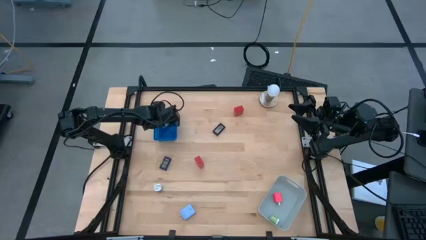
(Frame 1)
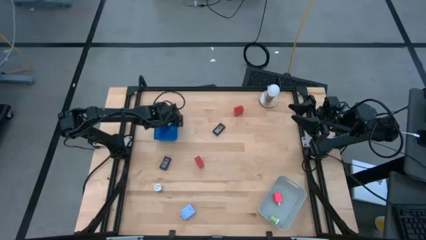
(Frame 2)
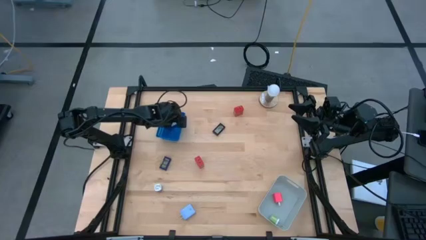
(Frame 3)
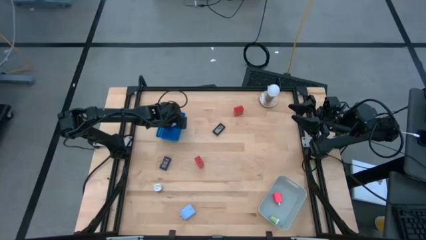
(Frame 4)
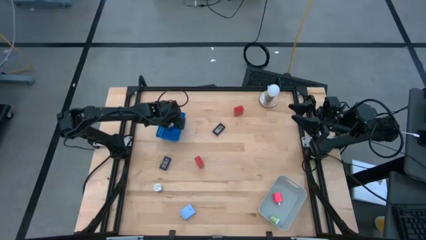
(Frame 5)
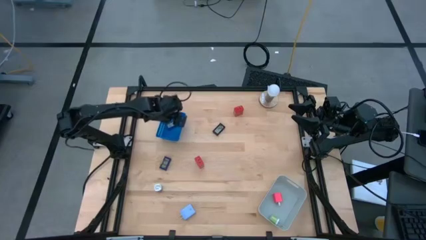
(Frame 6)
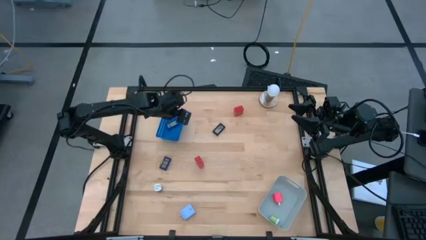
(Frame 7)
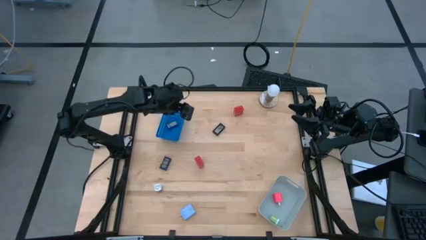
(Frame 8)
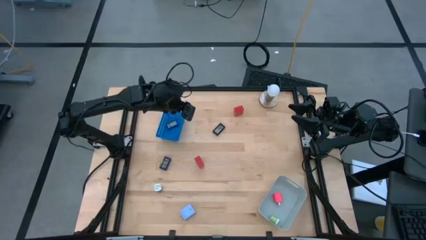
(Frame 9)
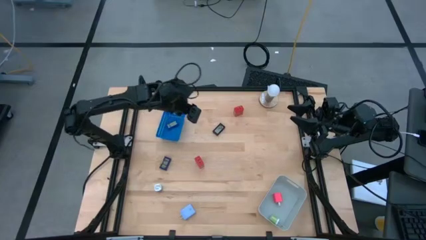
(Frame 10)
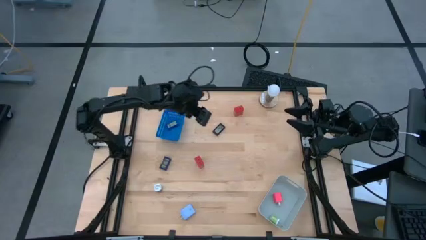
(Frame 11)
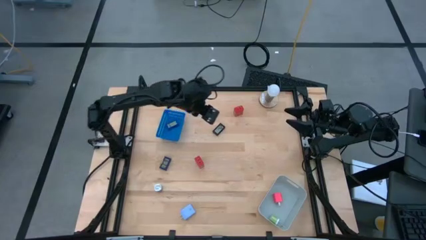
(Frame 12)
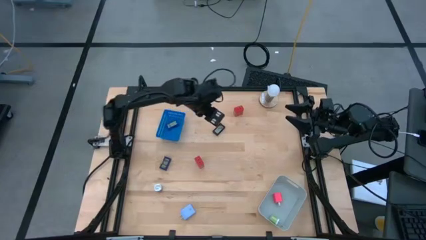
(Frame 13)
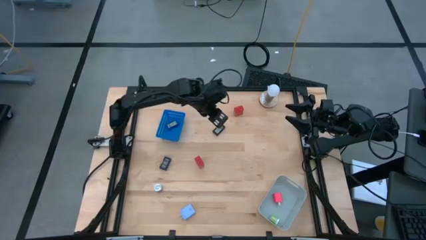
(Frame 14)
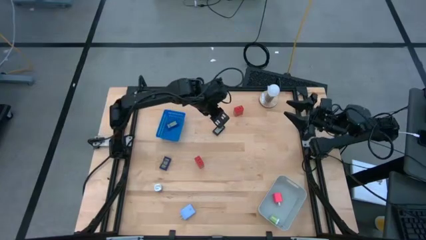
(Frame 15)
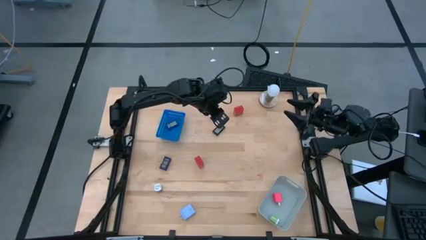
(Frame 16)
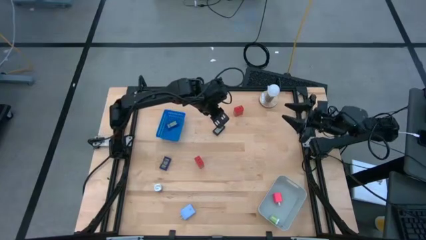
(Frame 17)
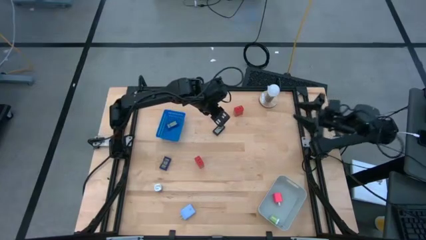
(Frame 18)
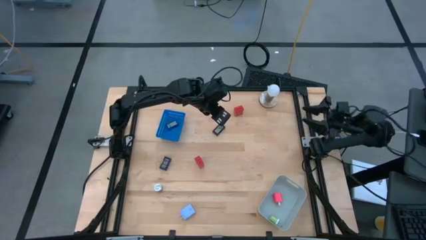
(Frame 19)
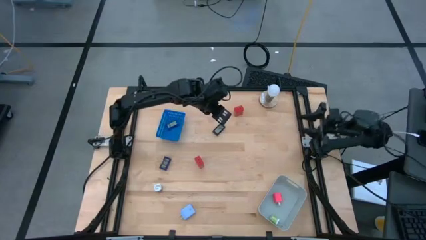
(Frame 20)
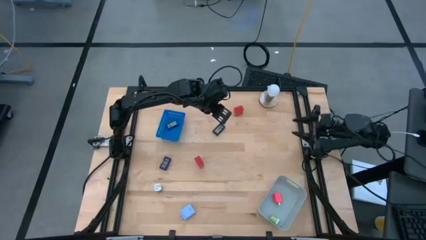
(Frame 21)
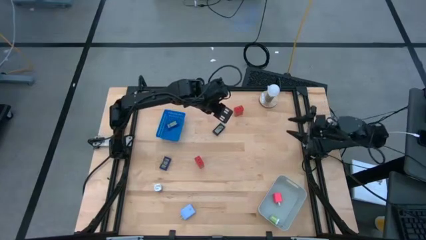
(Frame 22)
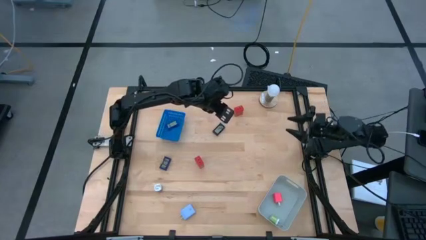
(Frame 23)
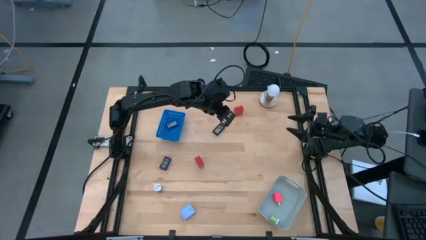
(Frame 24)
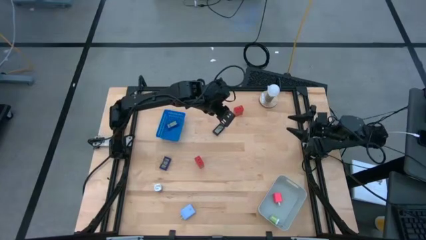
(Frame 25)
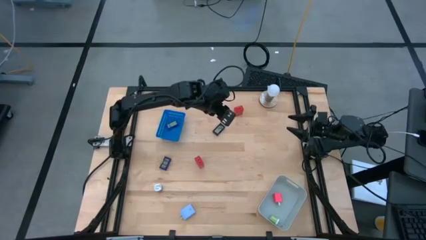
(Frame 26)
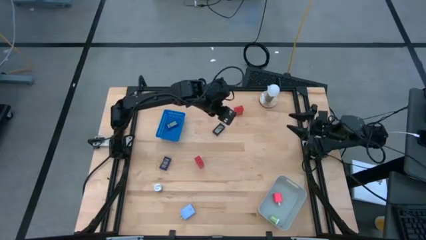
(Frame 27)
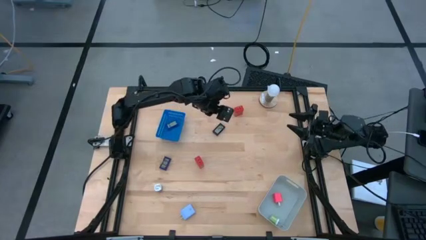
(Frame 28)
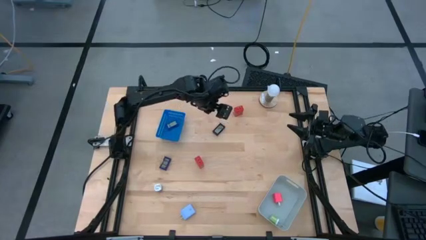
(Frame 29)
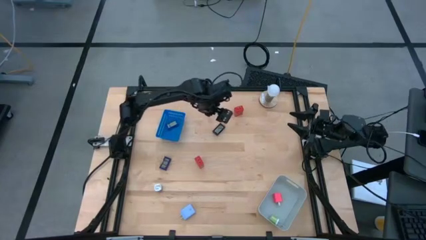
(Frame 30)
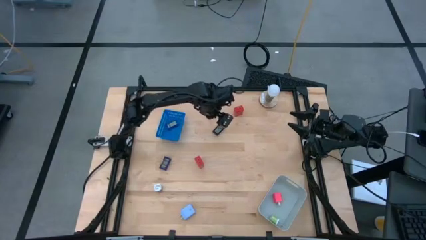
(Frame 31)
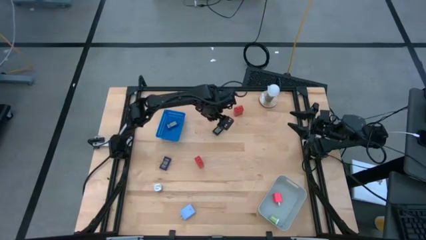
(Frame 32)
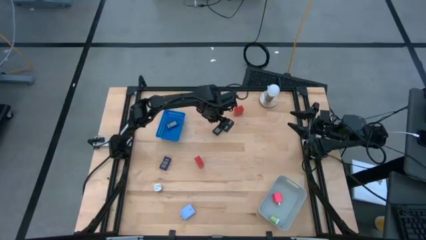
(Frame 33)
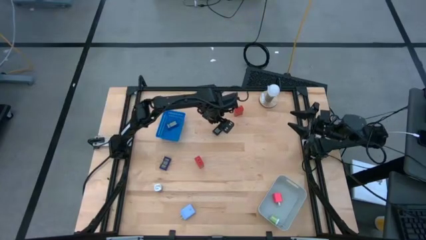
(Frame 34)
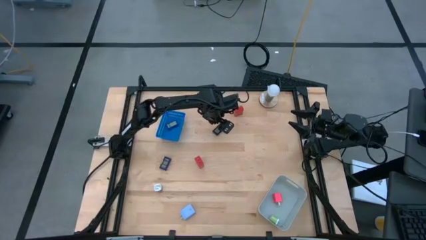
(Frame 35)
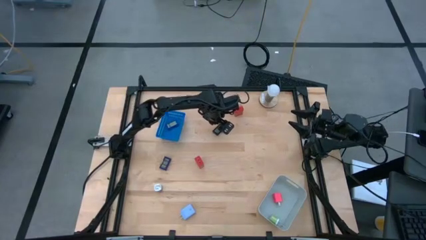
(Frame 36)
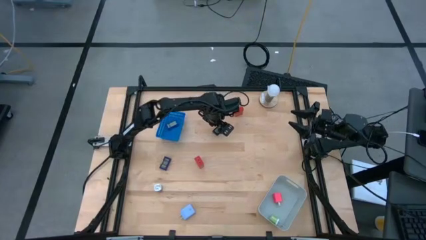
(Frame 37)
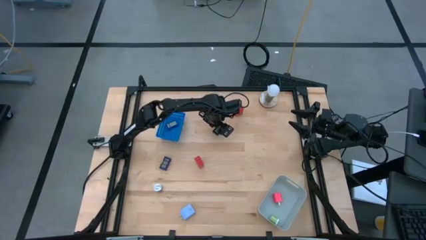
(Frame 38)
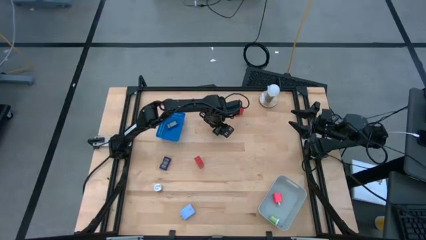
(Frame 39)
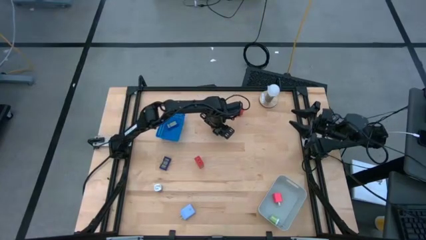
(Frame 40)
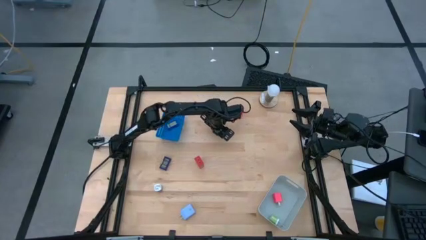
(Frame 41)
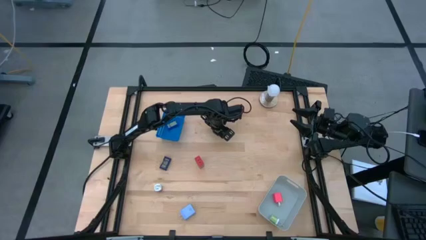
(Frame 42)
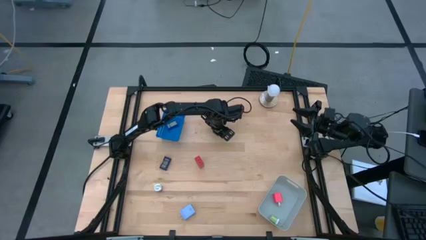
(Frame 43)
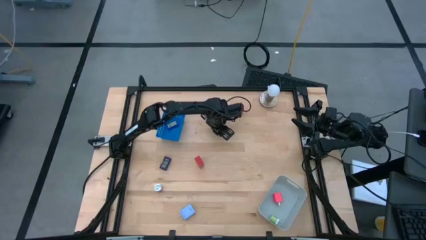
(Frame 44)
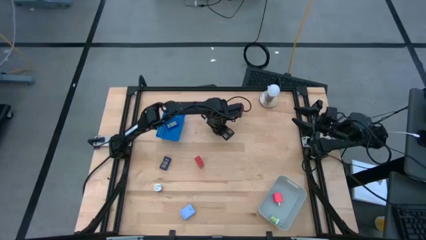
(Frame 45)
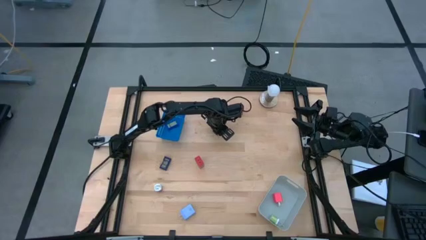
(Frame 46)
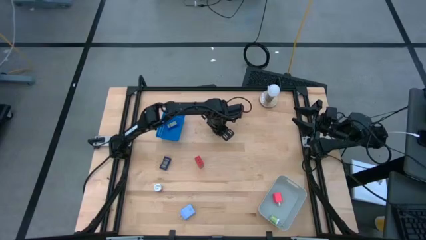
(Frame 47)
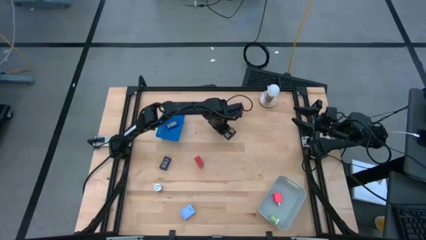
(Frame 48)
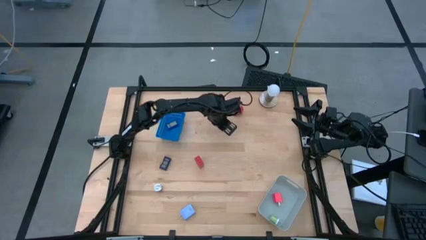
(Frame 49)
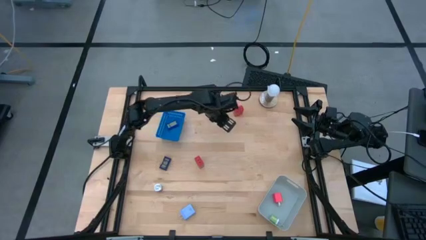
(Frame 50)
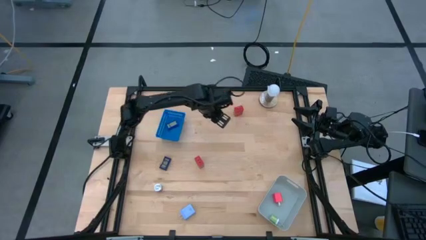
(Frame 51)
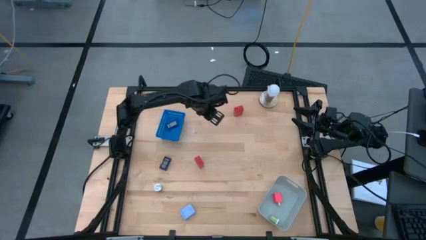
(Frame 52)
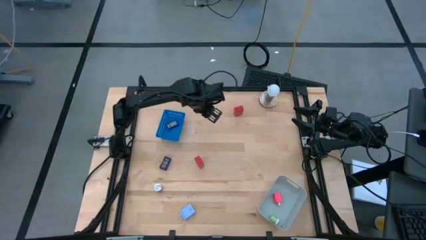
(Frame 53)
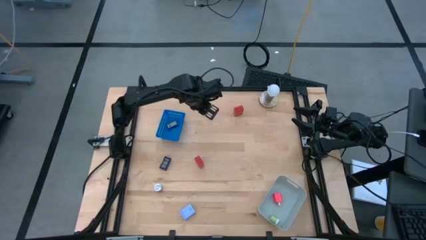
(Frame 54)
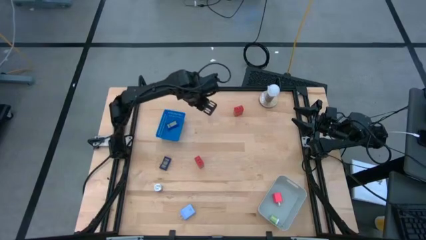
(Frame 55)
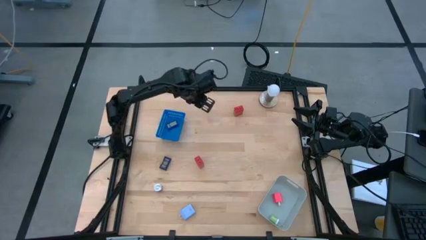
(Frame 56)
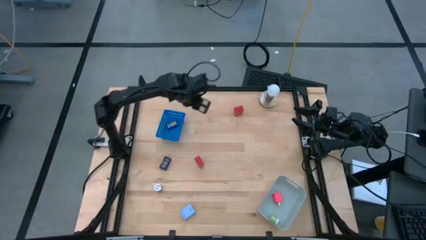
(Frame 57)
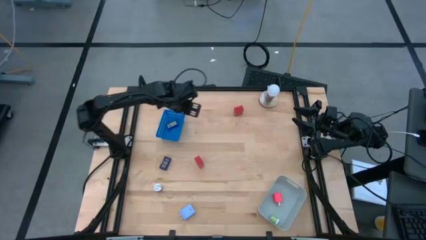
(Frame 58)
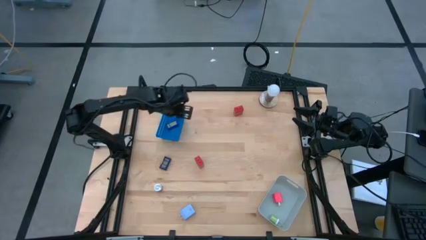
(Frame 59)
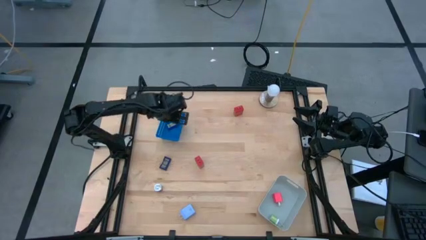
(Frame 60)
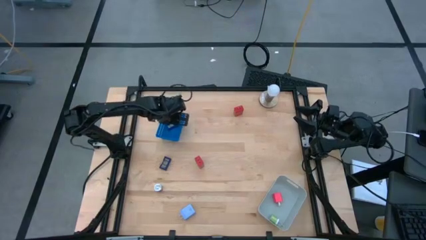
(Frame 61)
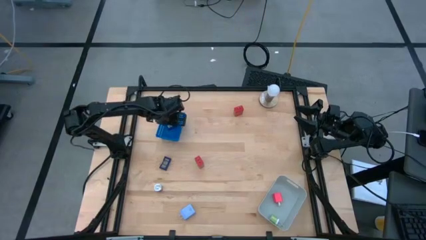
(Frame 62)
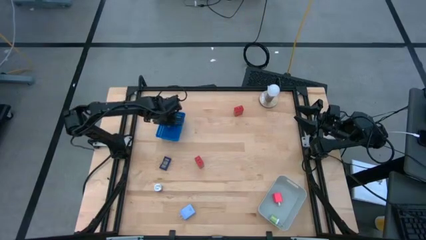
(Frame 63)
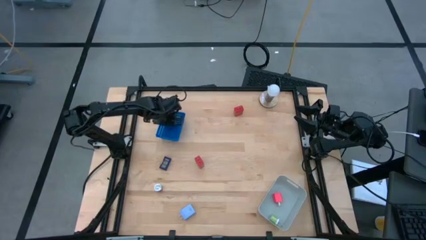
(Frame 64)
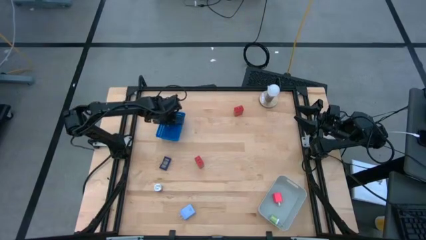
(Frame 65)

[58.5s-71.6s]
Task: Pick & Place Office items
Put the black digital timer into the blue bin
